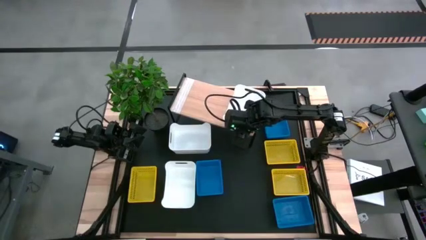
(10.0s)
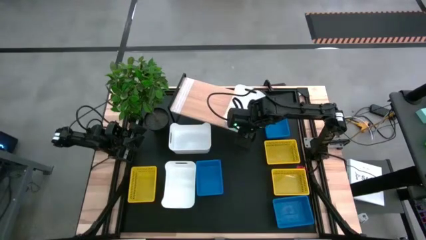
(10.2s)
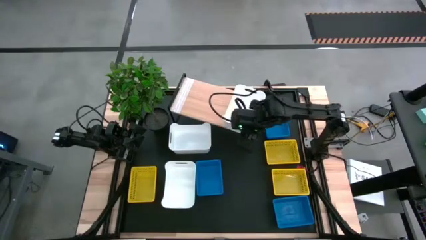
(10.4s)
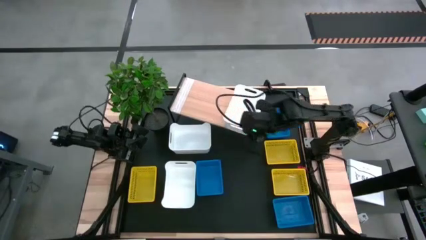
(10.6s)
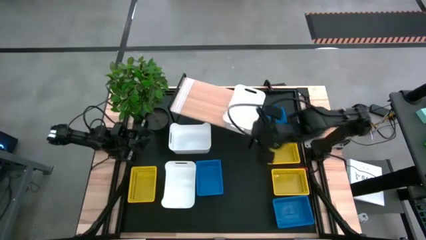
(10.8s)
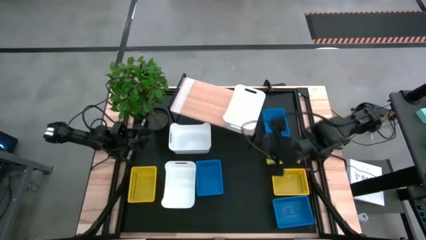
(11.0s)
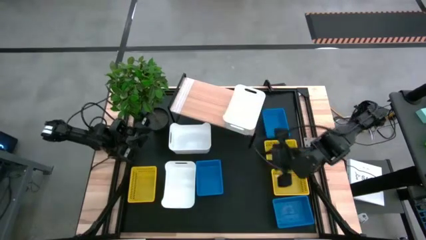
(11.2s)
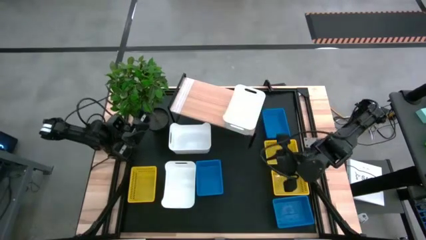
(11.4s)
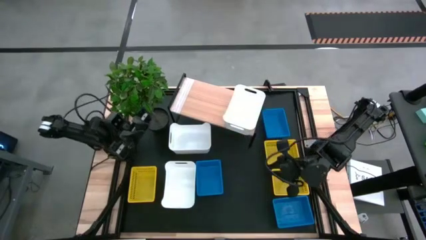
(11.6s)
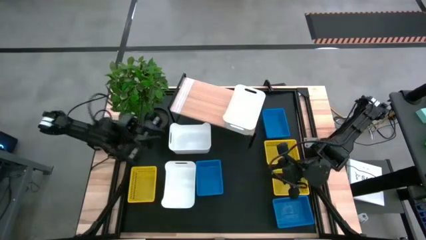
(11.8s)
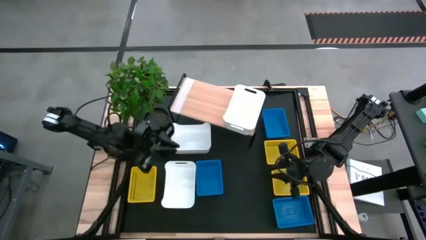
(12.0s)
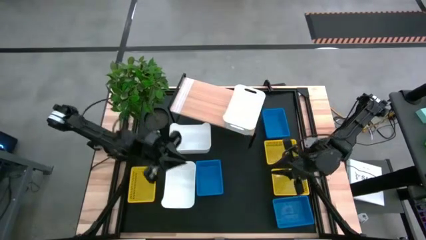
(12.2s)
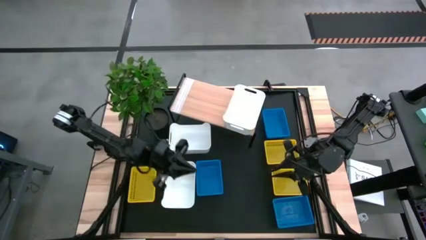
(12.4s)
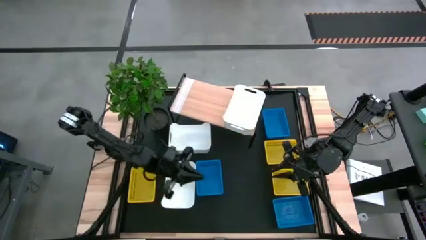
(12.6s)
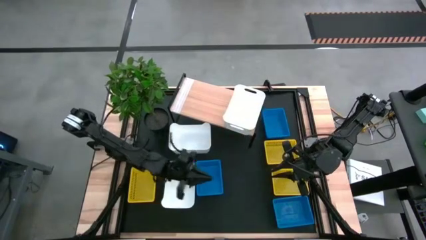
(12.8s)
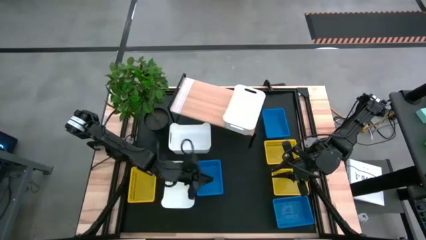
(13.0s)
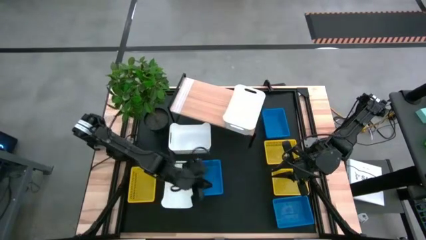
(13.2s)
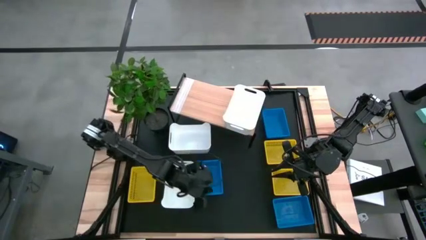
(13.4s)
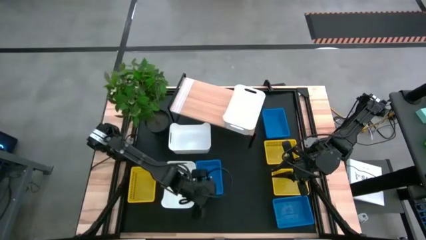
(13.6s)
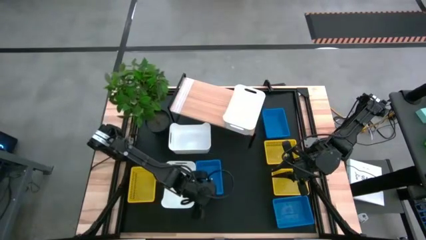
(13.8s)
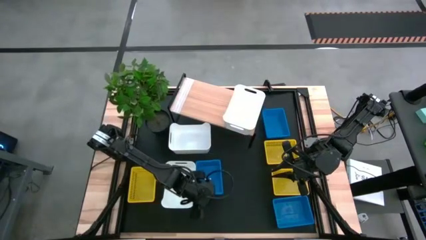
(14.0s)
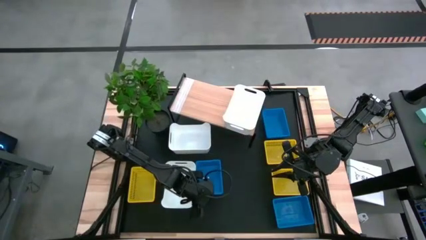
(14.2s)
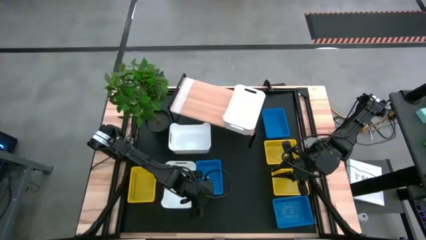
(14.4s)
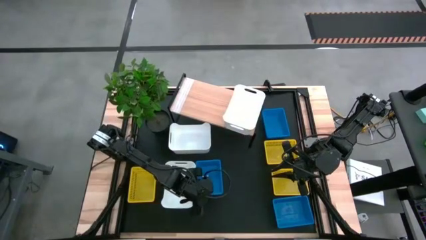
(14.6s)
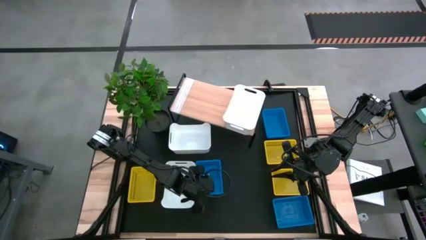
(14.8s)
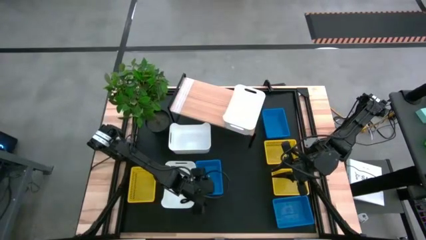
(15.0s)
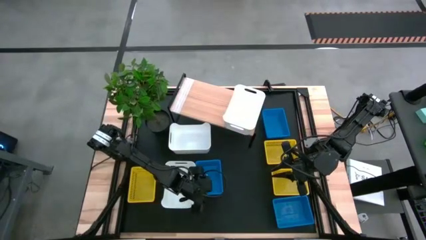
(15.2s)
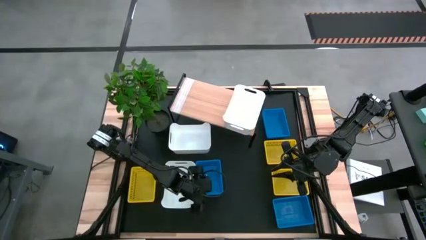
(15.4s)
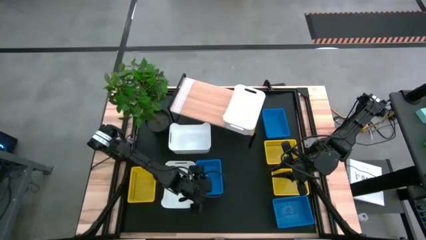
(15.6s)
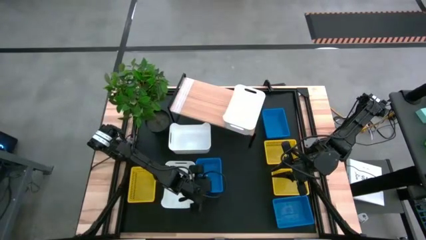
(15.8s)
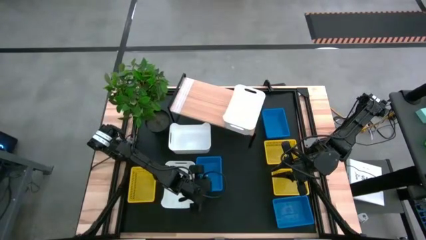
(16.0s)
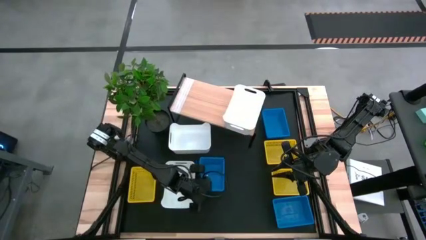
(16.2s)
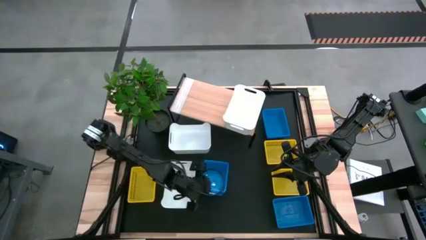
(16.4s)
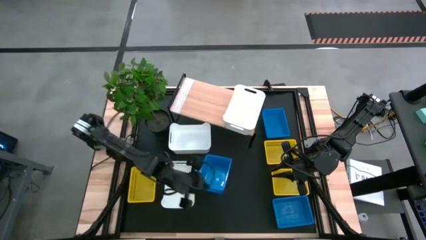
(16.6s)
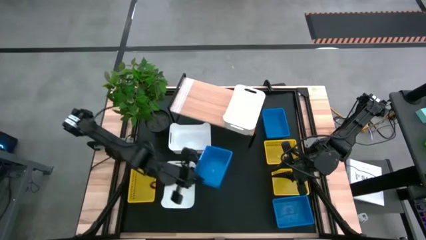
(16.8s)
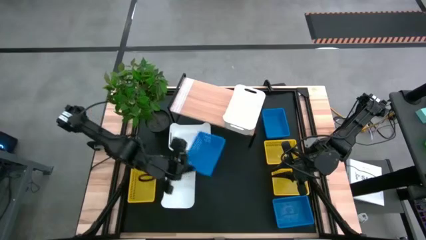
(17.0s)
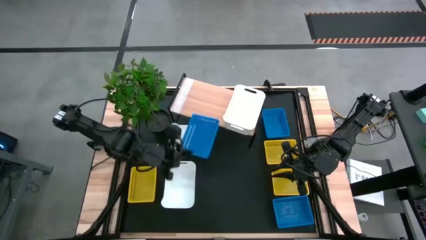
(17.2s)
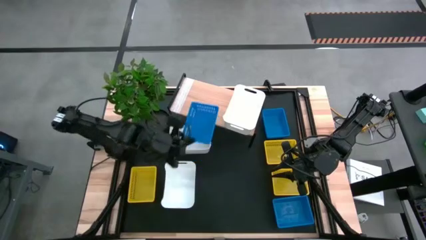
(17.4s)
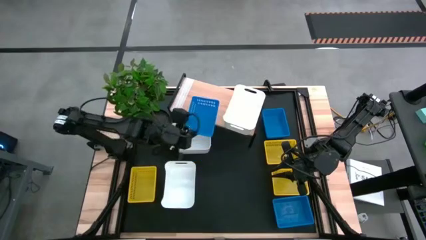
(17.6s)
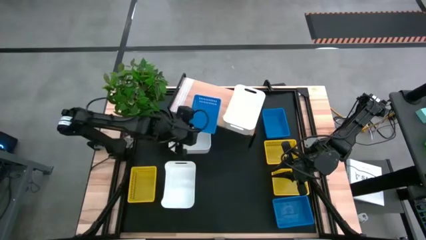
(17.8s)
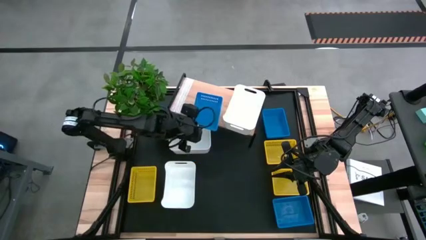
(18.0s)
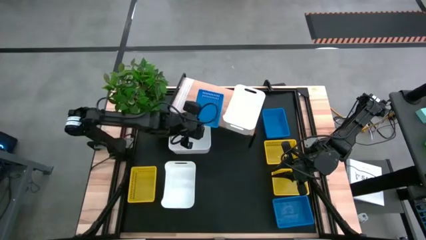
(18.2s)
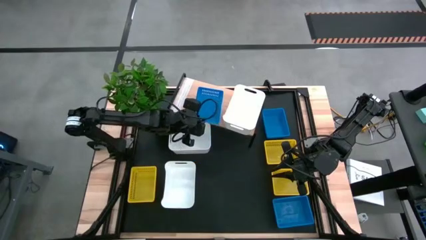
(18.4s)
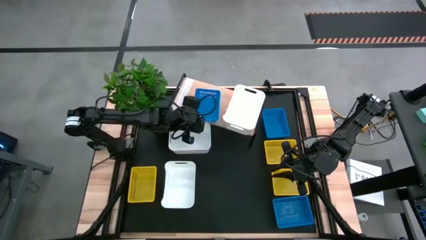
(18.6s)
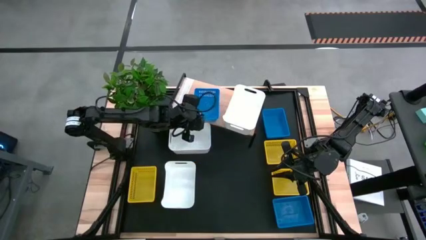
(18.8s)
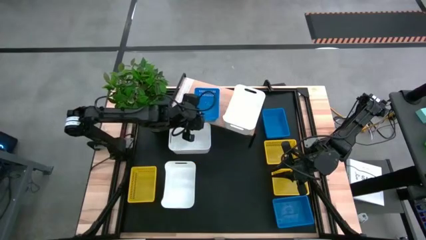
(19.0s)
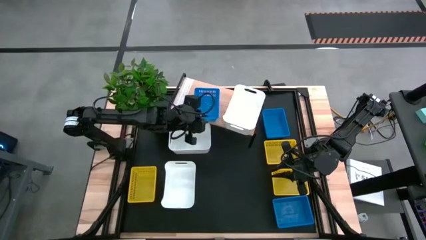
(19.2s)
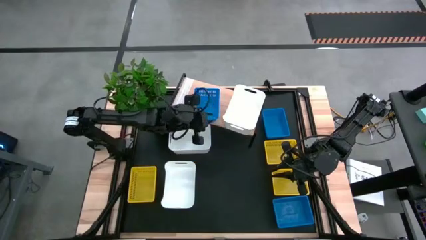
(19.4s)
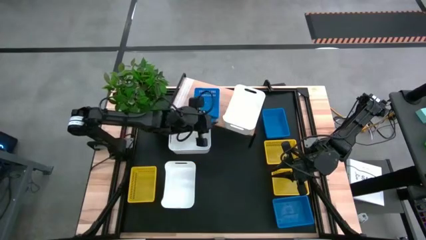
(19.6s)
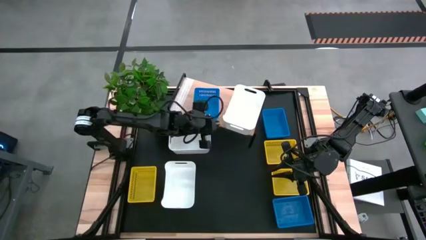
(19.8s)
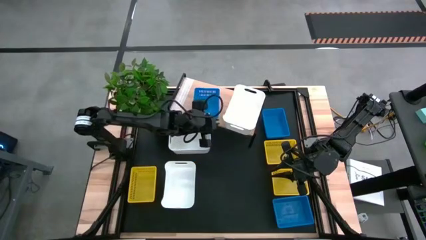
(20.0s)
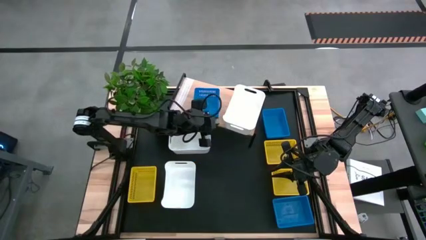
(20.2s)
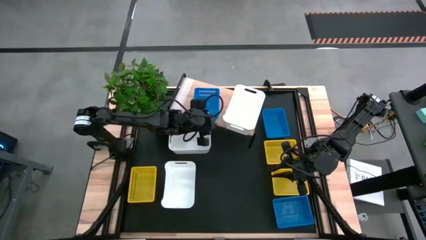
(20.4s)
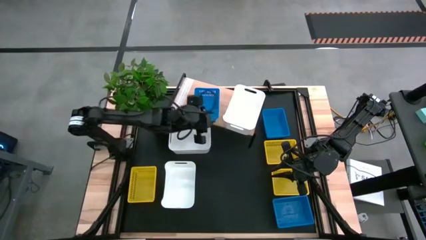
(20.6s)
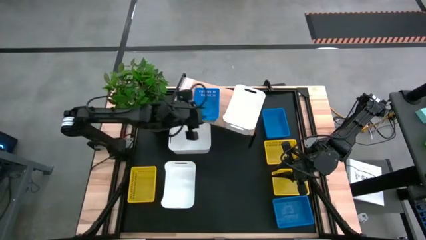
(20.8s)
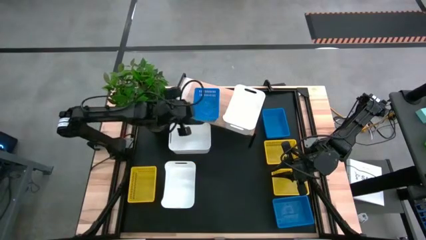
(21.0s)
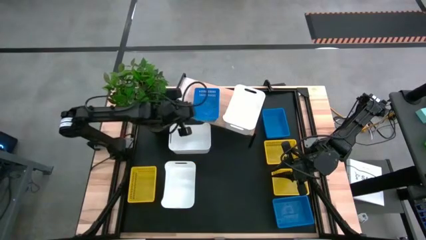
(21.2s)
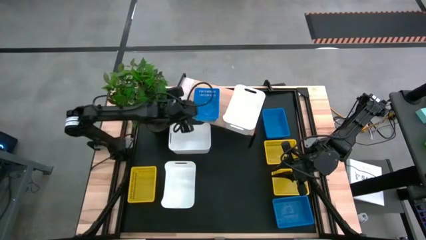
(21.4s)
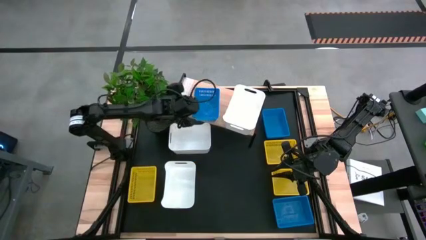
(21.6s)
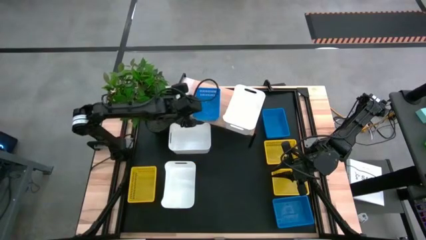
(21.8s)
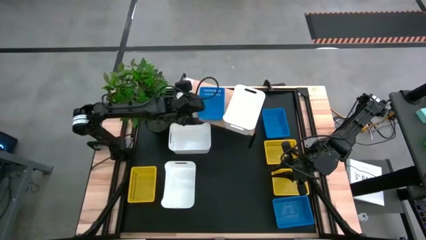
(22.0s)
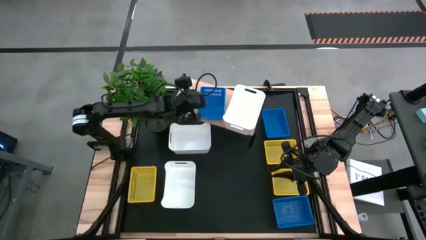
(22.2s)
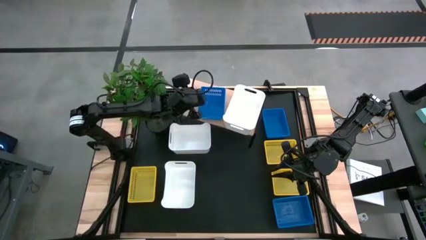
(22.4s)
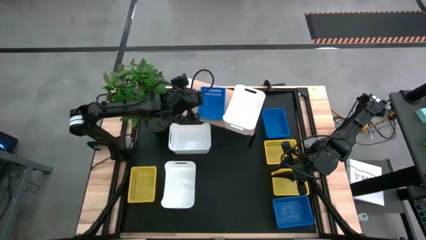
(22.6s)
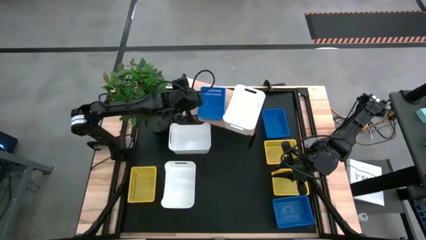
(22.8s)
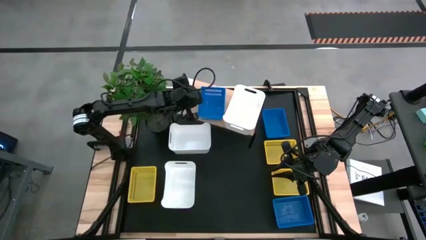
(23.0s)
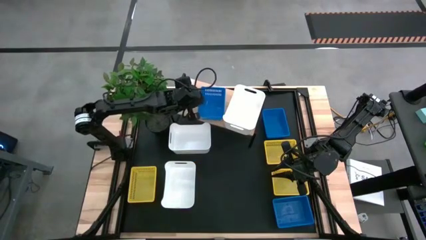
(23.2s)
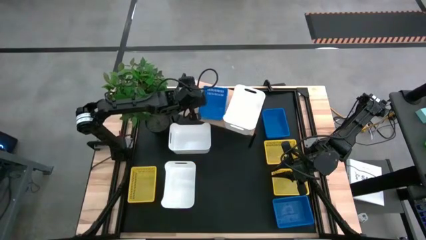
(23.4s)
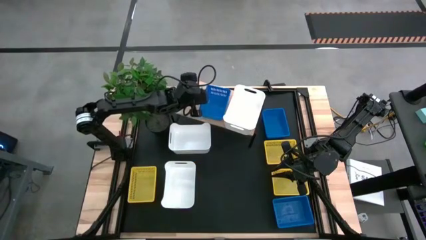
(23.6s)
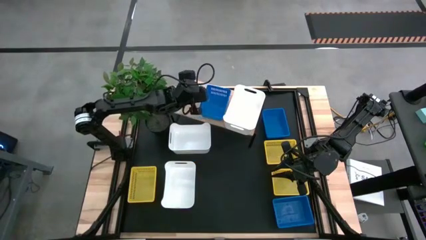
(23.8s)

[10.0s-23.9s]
Task: Stack baskets on shelf by color
Put the left blue bin on the shelf
